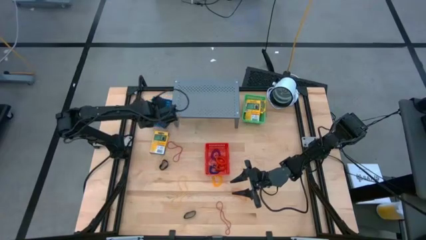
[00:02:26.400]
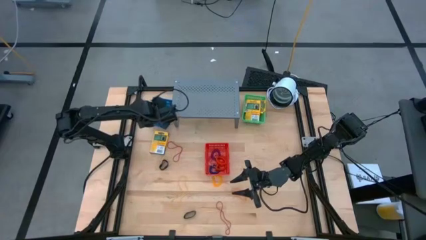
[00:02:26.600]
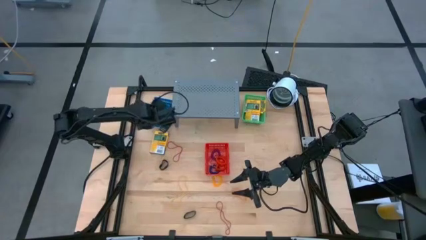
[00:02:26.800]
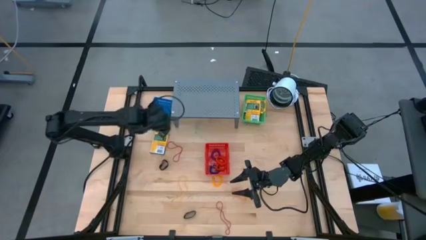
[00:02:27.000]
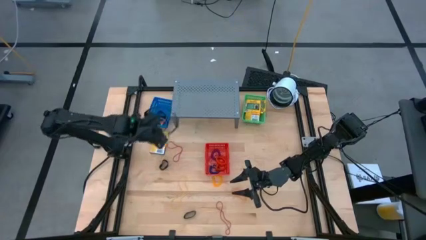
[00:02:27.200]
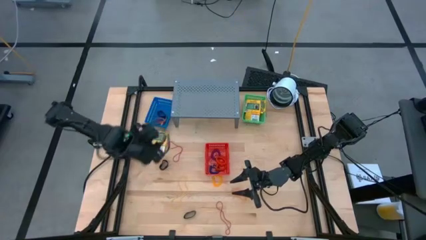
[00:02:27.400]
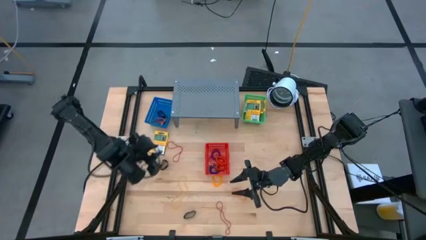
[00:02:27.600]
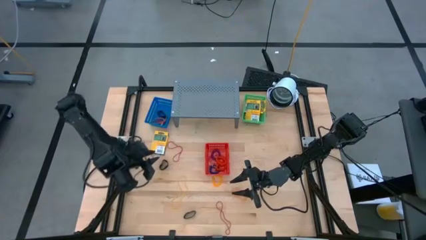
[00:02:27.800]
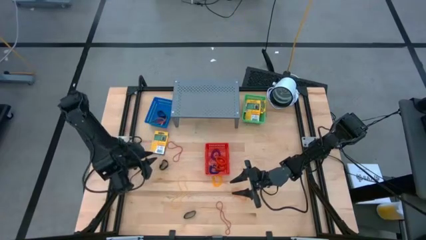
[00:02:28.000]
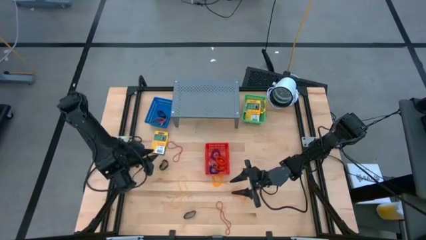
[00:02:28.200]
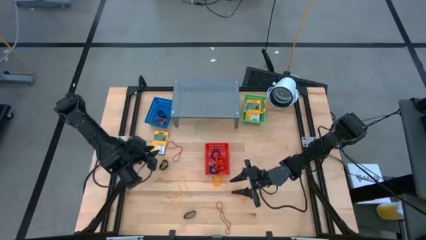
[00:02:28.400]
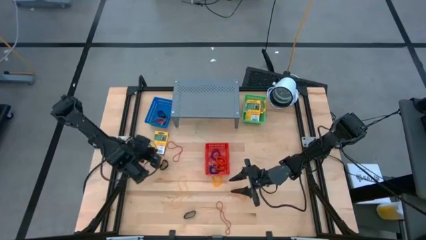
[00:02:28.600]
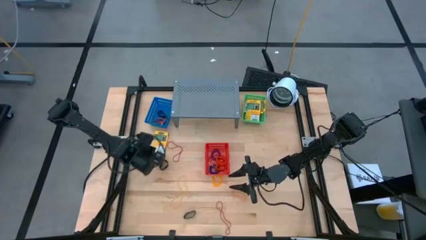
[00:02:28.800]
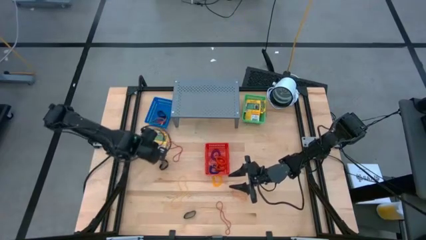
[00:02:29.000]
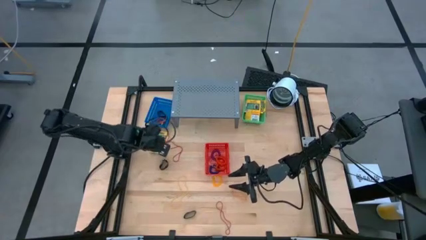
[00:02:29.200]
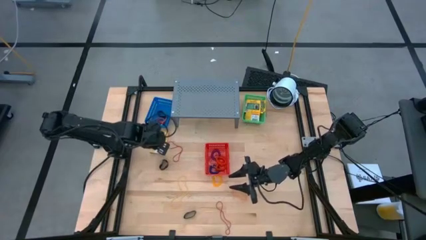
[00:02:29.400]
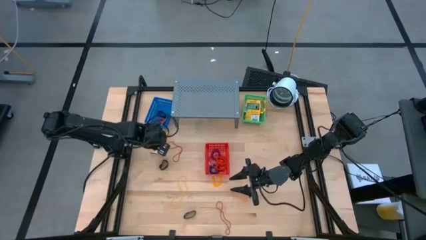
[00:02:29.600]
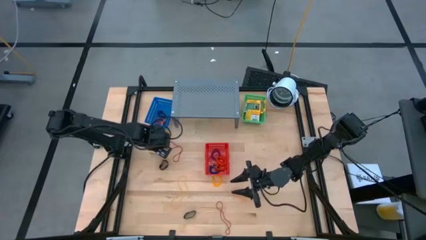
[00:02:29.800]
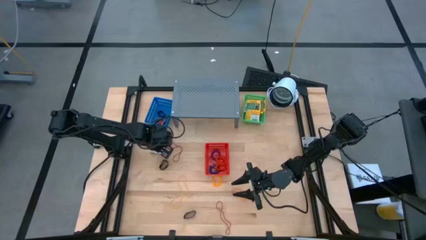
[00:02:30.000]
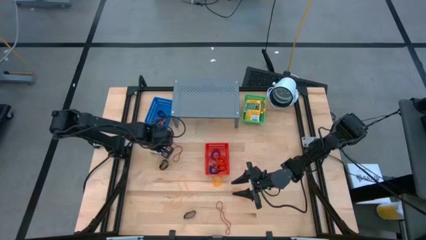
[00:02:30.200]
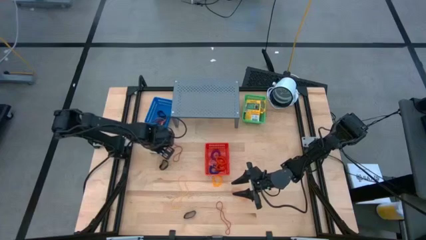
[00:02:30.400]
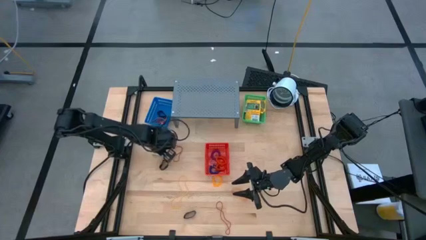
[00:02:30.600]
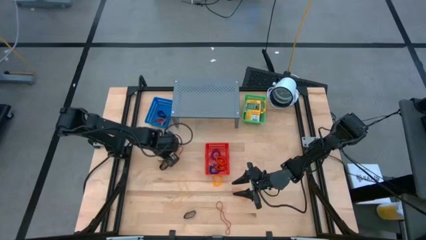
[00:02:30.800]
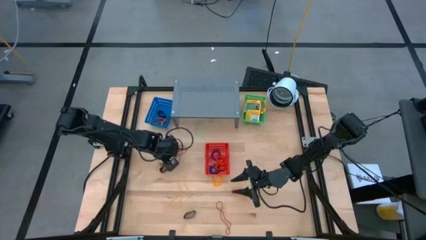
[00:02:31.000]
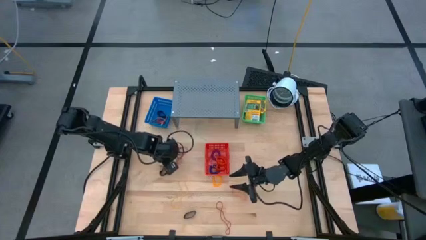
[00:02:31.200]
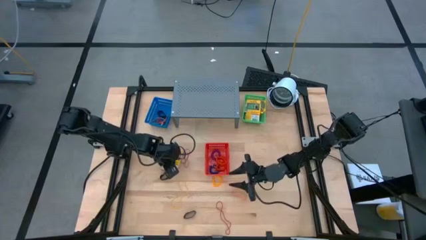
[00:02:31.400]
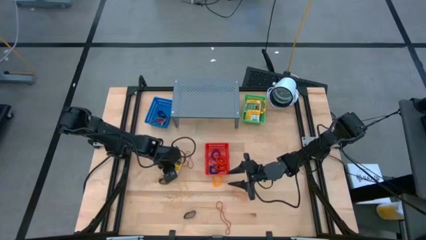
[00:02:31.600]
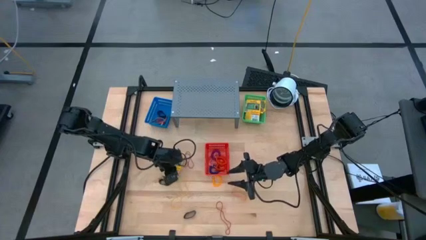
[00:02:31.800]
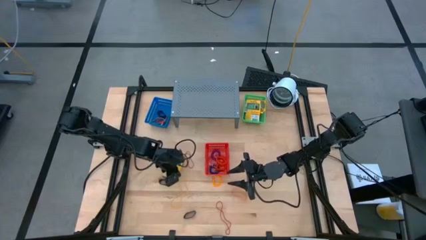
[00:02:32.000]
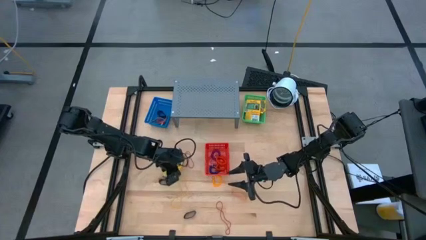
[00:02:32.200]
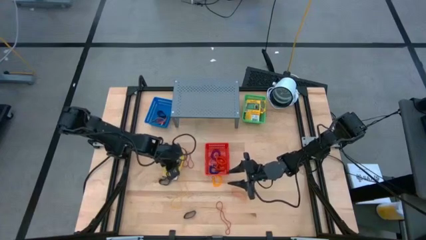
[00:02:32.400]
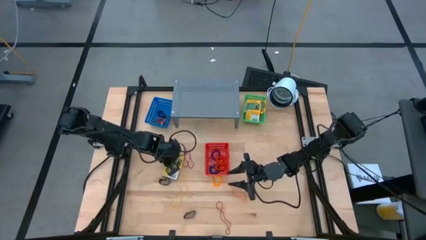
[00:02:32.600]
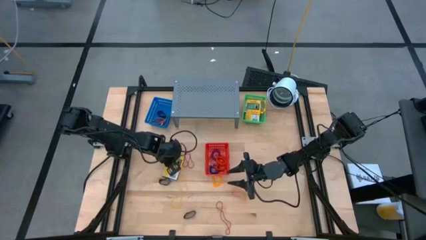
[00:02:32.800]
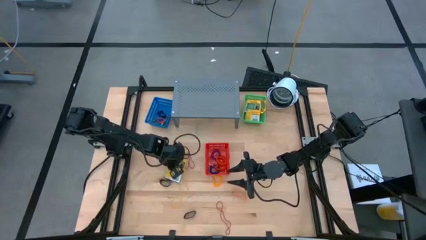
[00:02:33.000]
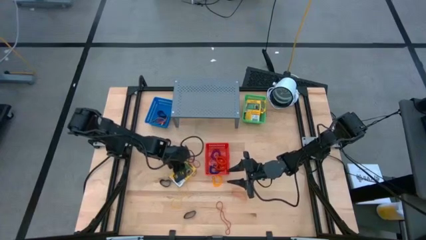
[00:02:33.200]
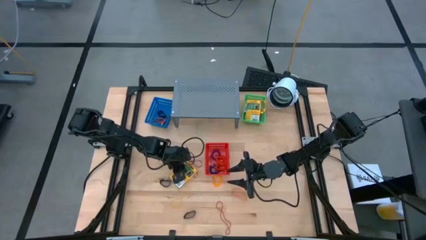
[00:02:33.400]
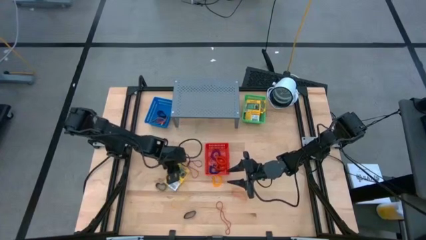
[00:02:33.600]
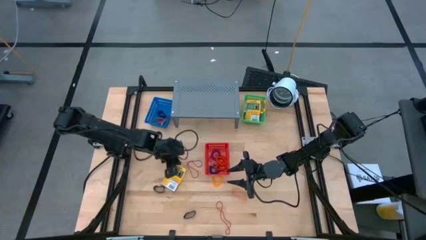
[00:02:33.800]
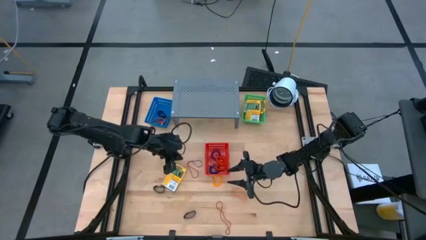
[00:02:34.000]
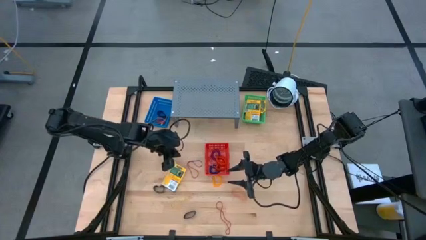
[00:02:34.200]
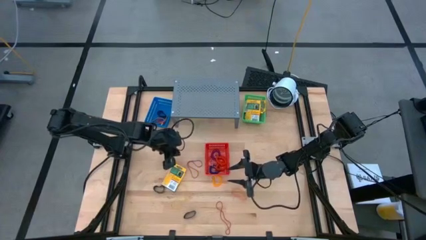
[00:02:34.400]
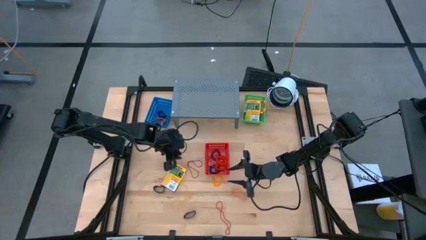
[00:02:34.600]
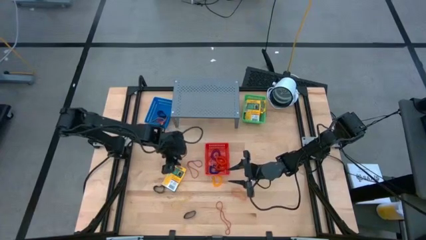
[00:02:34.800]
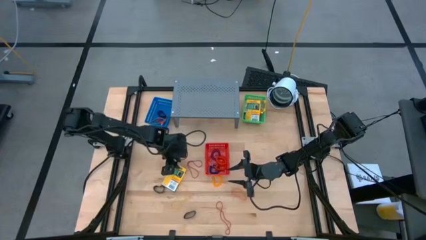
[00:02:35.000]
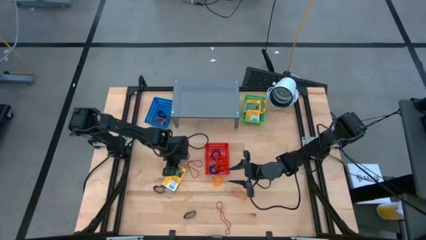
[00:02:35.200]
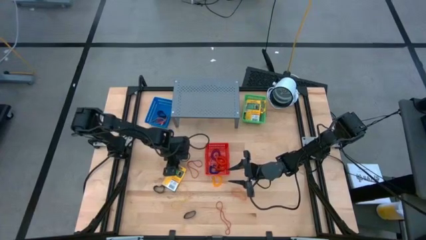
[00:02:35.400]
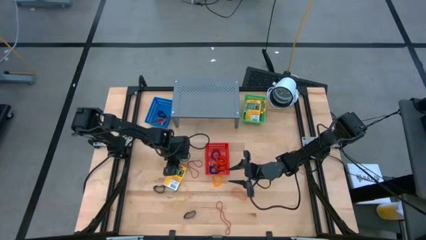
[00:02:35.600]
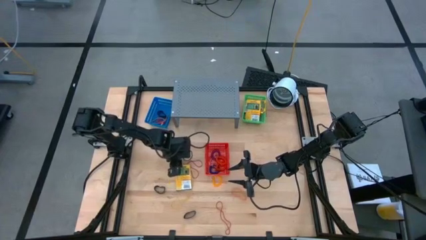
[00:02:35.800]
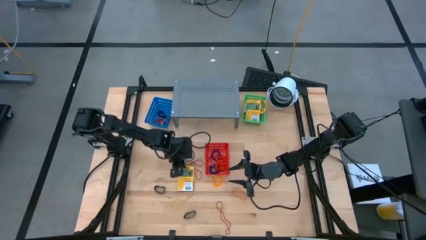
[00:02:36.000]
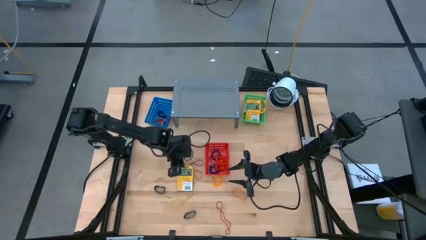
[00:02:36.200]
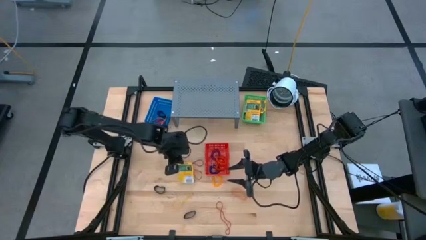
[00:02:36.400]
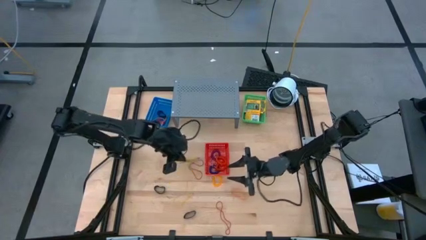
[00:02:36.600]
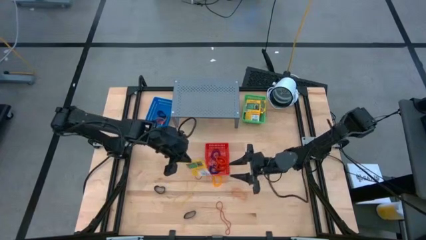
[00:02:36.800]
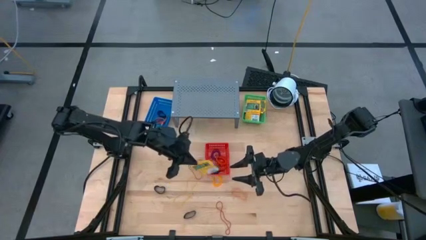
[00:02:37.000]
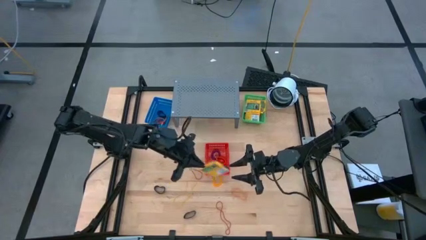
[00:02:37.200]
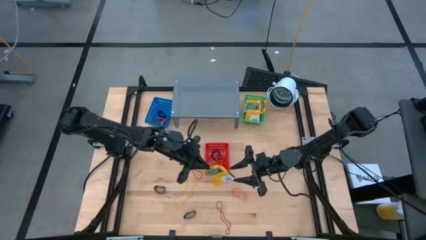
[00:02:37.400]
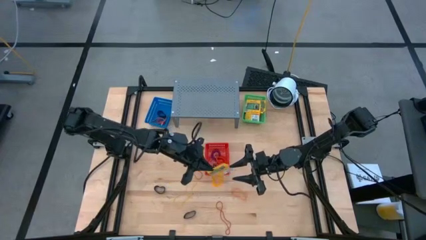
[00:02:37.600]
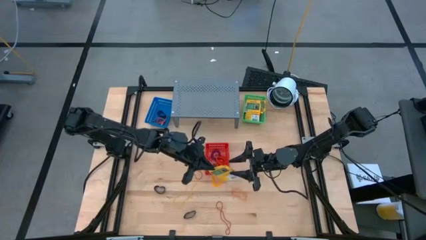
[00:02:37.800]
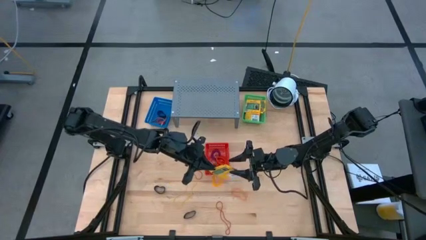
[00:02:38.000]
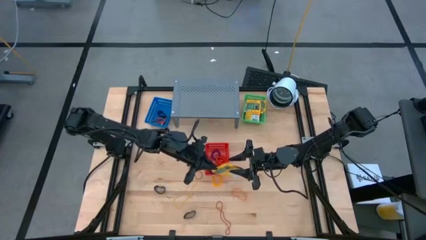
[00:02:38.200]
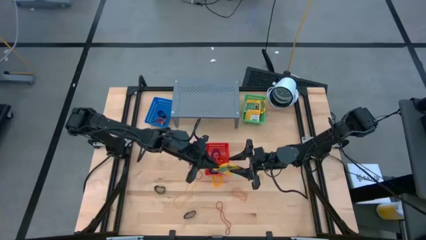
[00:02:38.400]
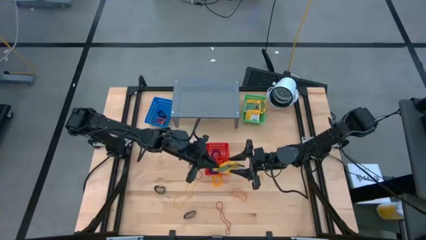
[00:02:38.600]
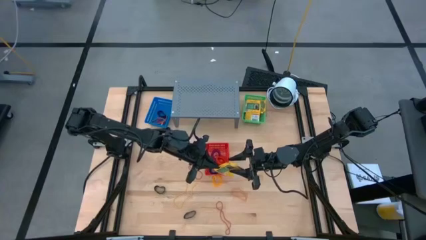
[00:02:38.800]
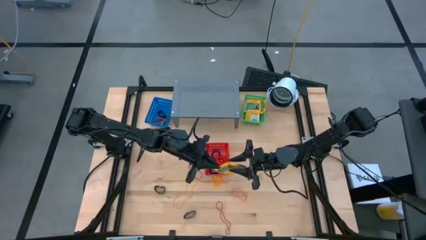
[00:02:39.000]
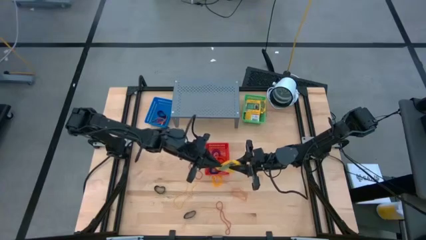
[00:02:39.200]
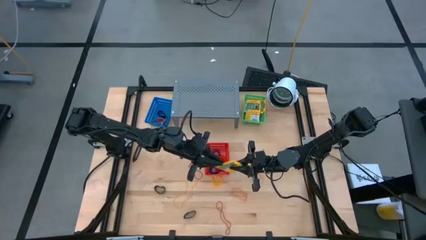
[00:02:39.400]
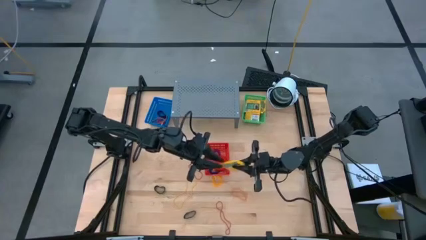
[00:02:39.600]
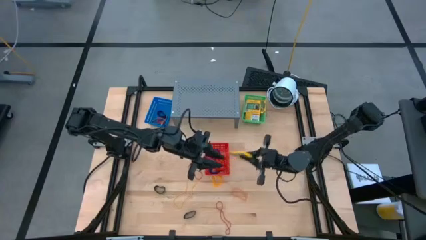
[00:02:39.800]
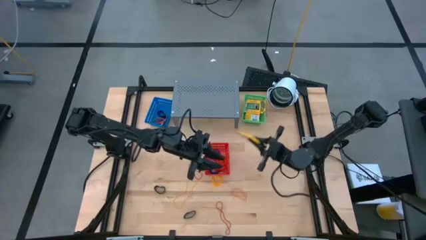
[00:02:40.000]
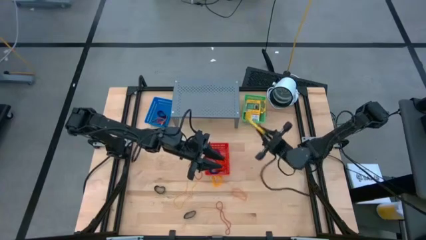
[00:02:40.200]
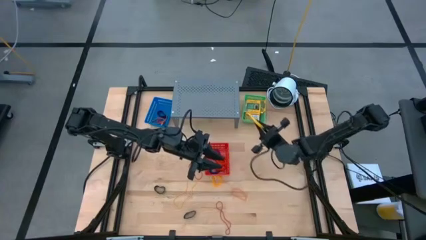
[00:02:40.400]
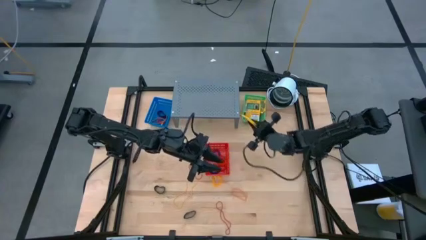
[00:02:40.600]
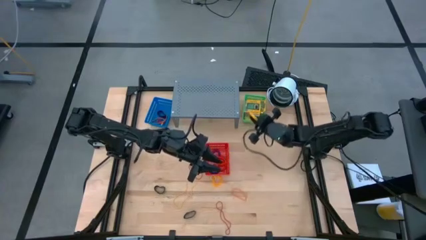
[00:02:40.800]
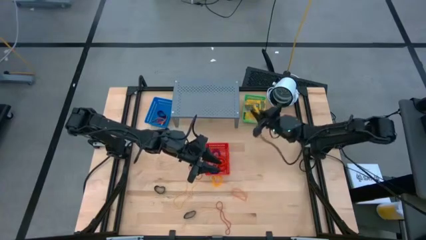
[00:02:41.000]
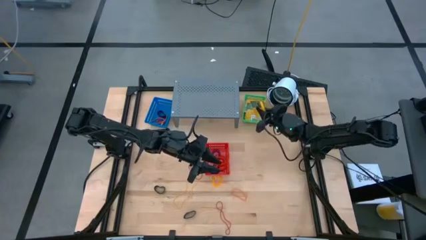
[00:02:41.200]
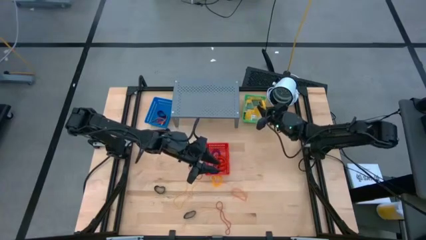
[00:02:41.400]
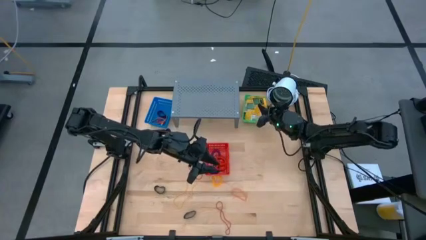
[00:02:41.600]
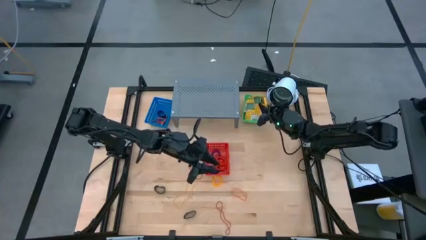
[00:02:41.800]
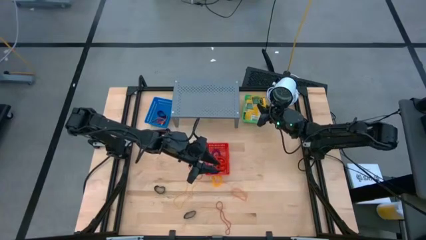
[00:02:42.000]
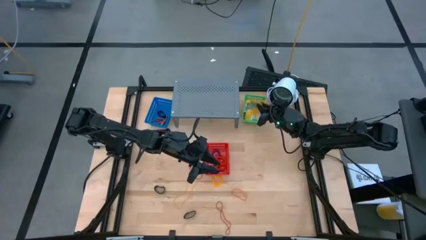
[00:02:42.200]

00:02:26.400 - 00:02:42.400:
Task: Pick & Place Office Desk Supplies
Put the yellow crayon box into the green basket
